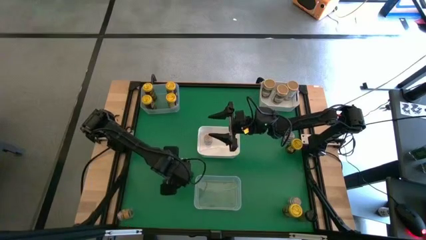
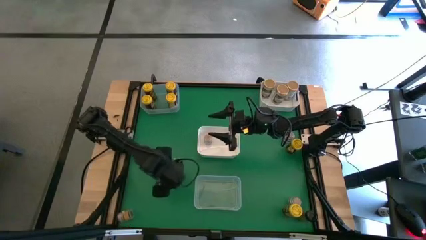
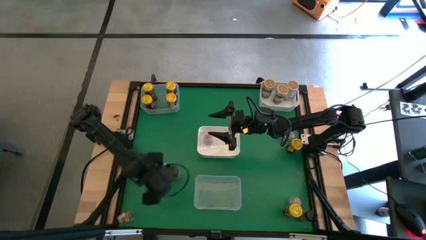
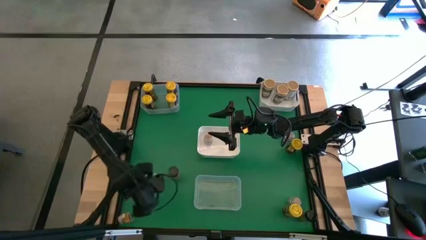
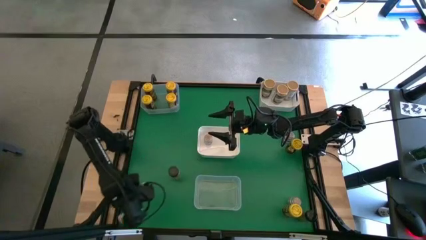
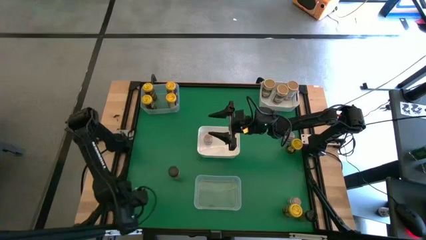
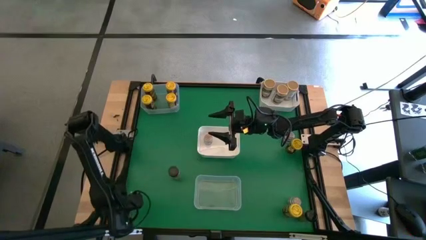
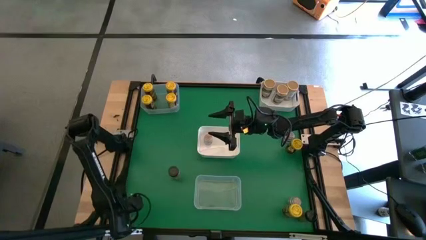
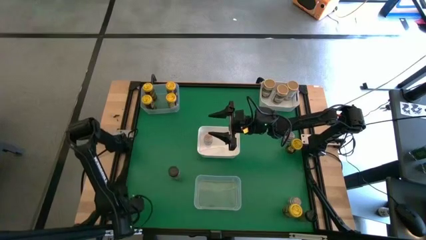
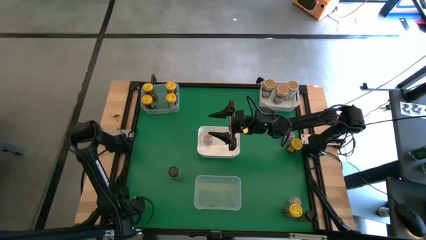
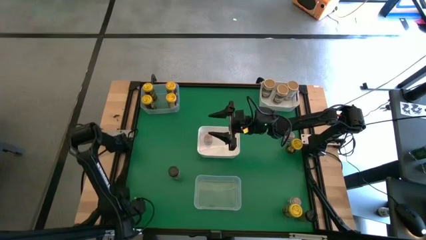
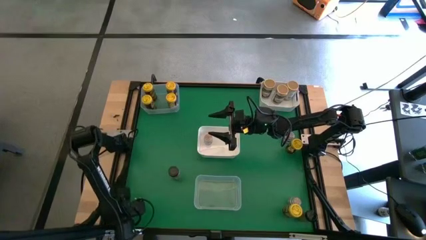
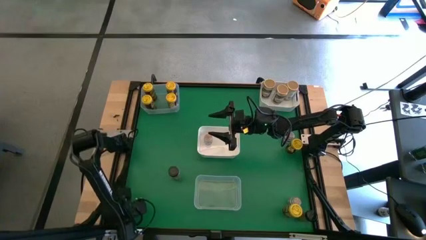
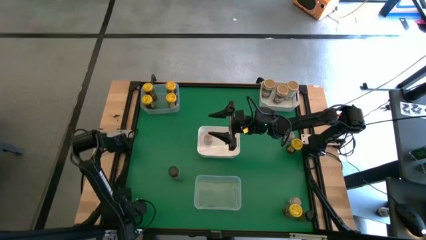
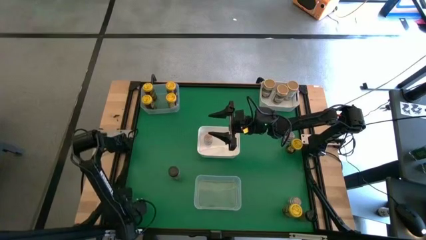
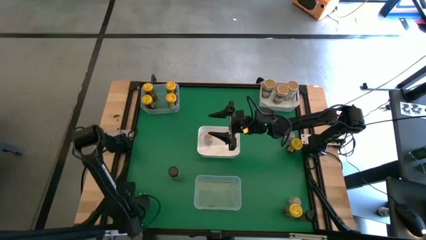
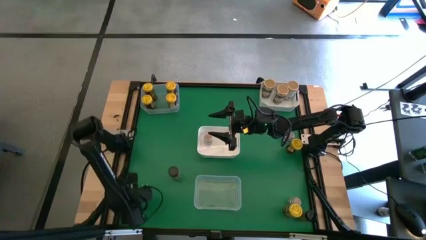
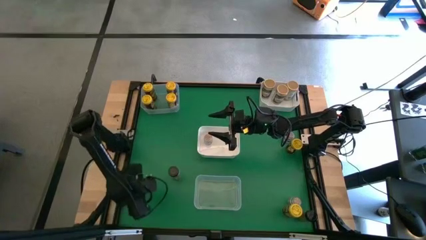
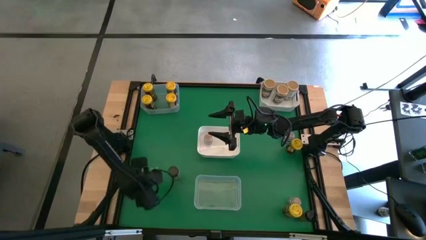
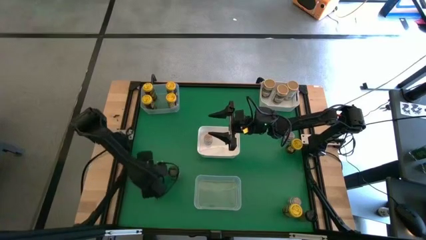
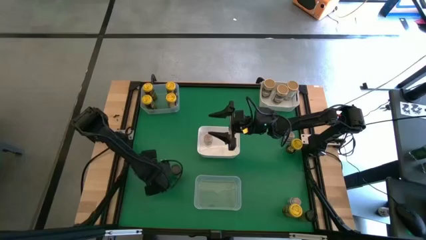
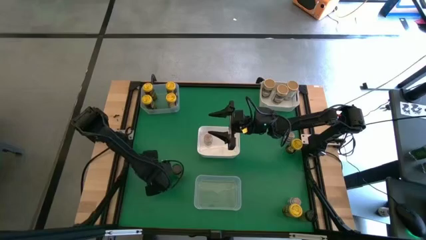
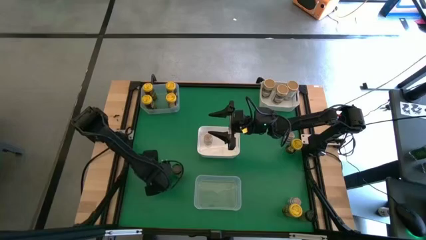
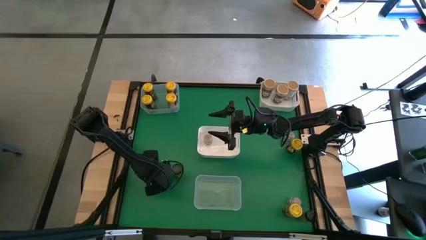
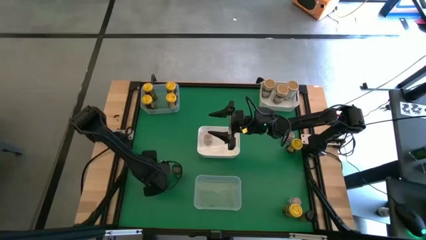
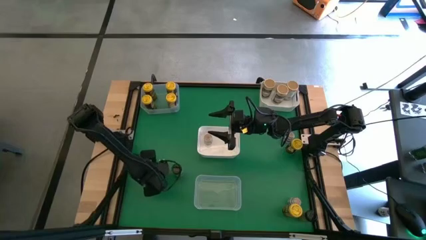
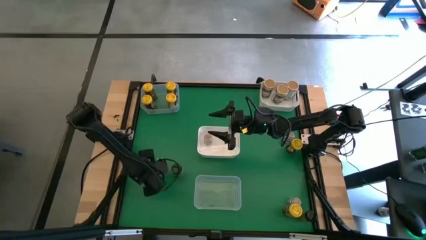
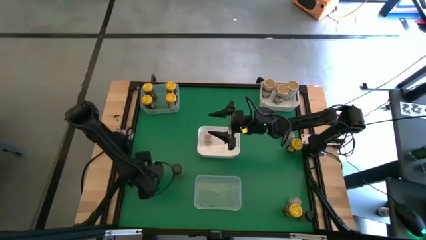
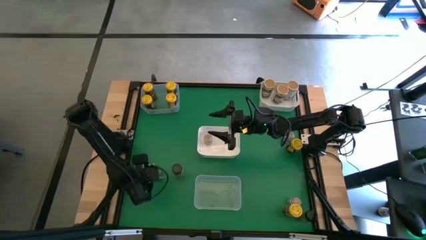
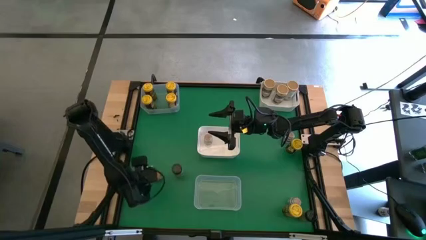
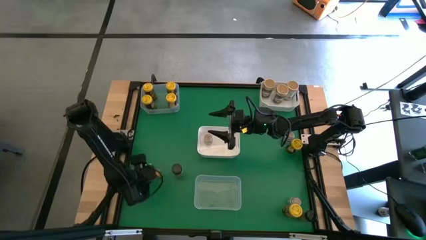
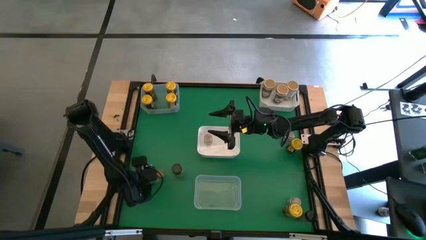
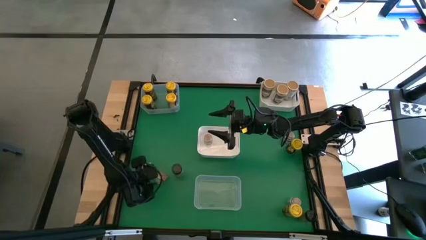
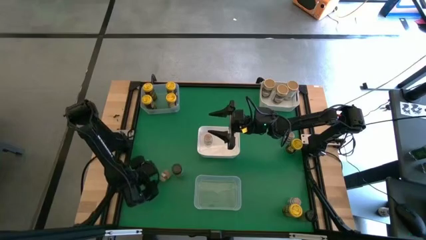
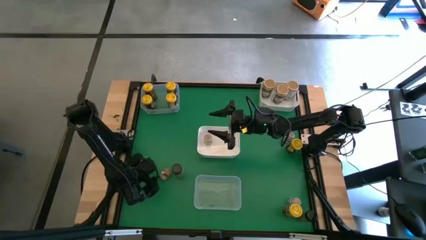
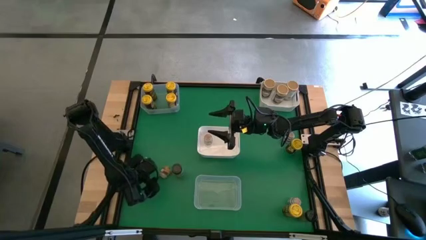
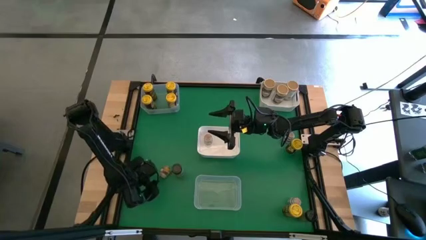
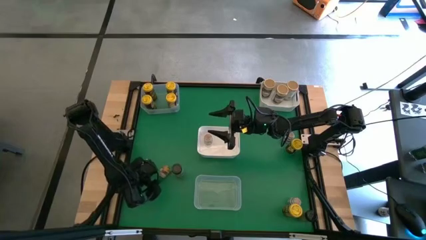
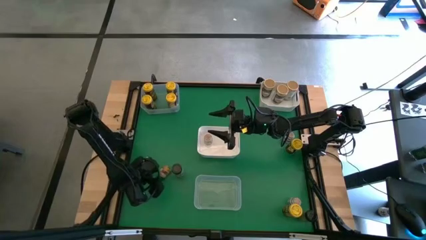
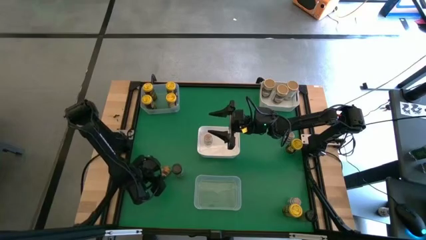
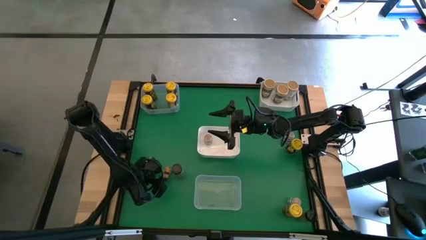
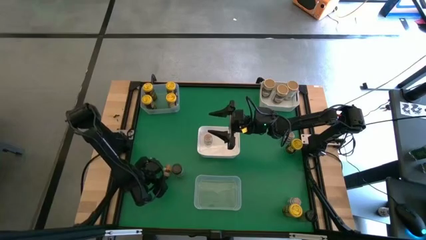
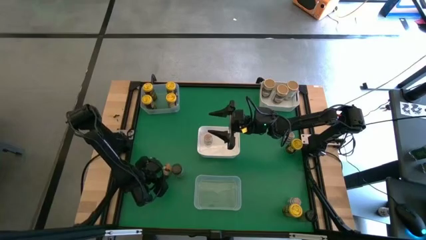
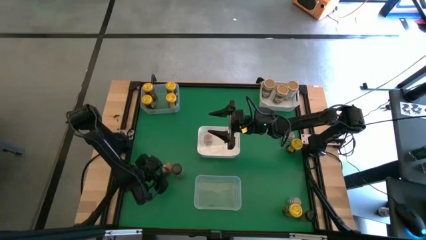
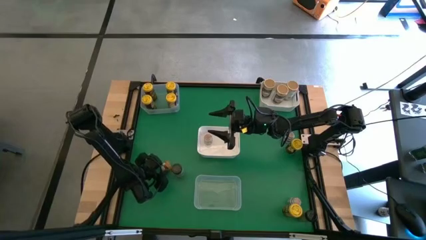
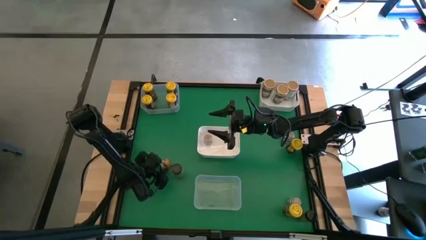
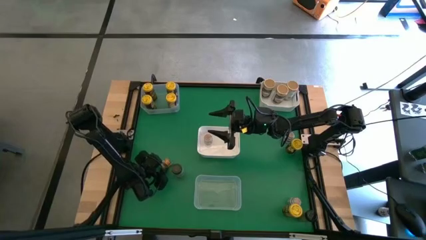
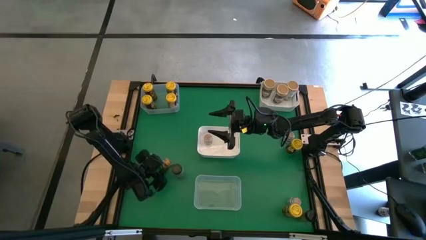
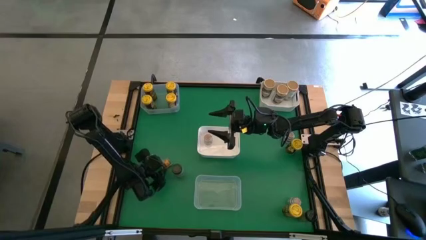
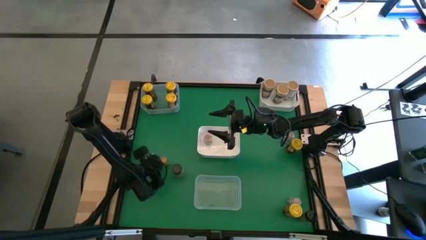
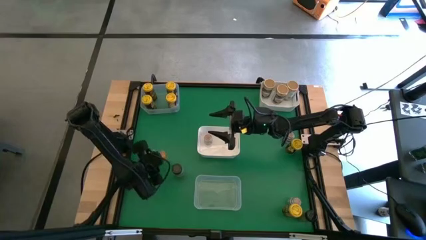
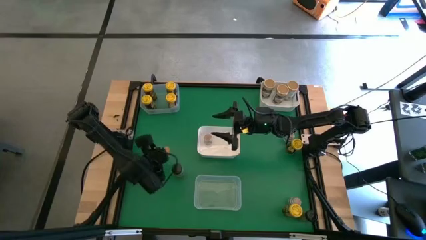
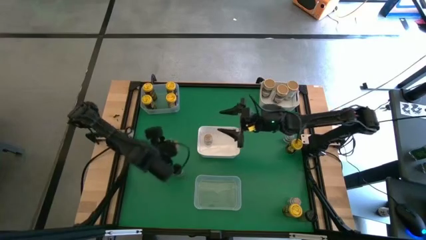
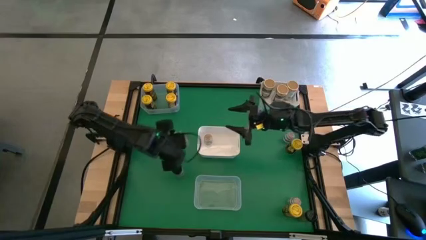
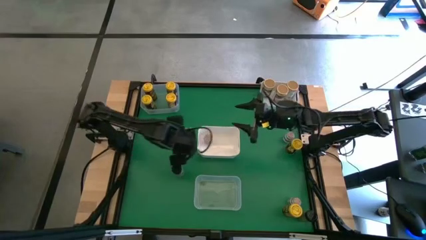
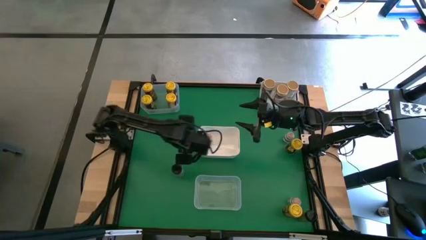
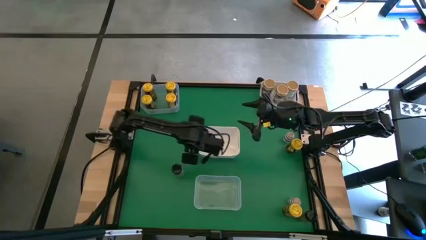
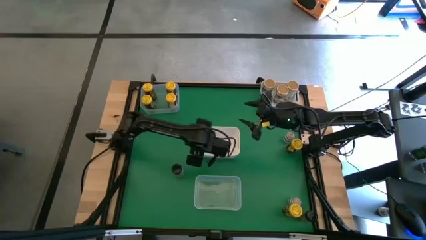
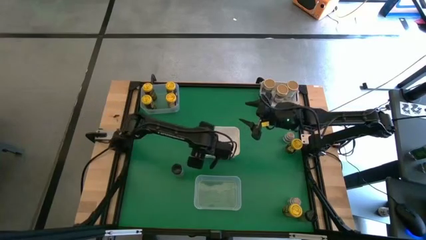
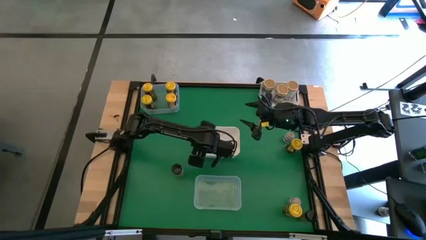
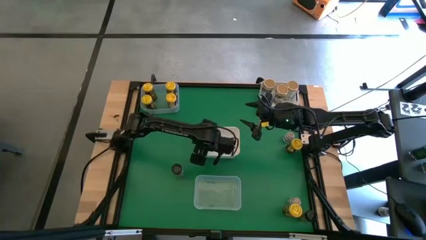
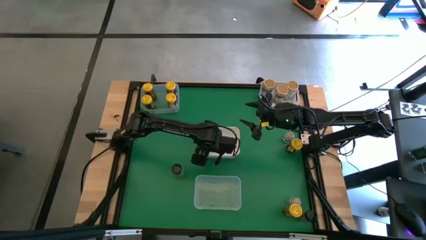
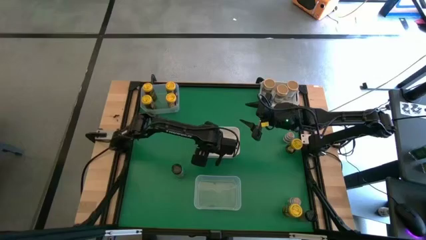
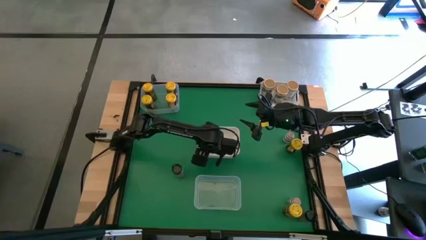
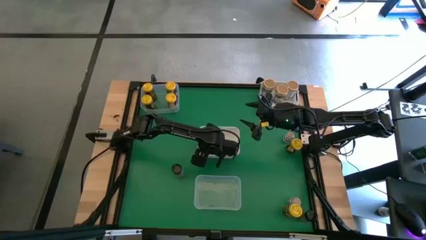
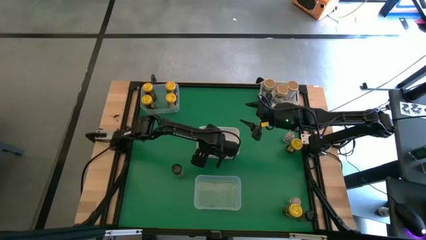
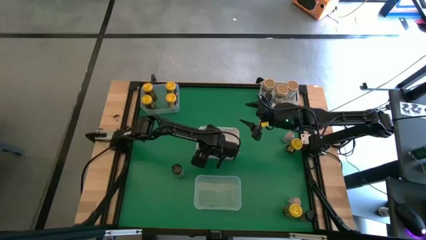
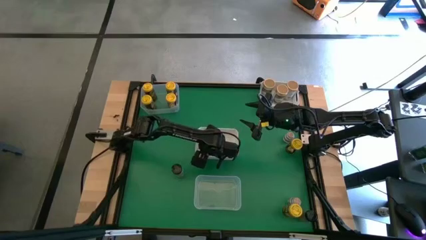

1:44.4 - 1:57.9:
Task: Sort spices by type
Put the left brown seasoning bottle into the bottom white bin

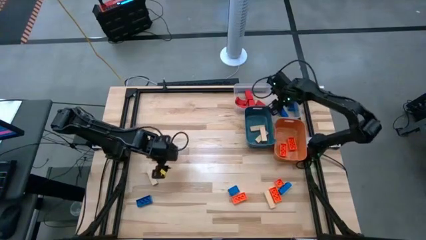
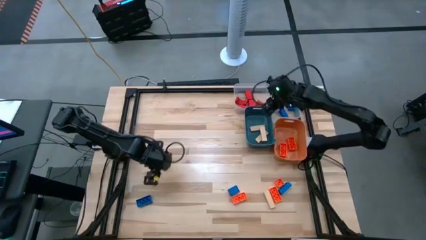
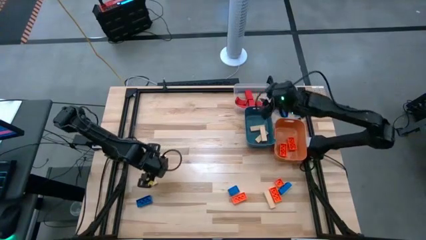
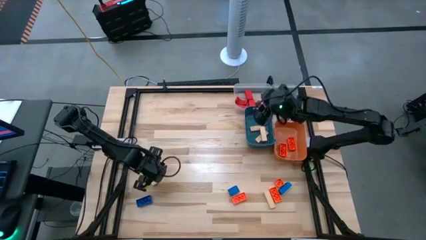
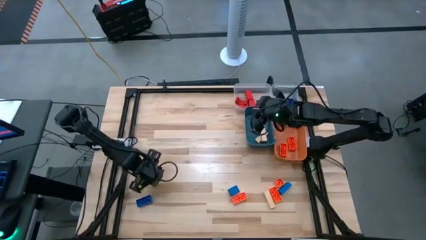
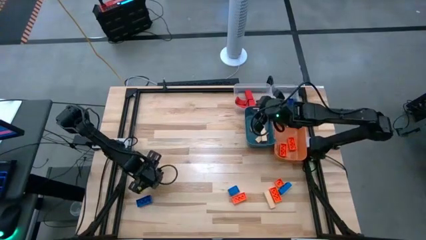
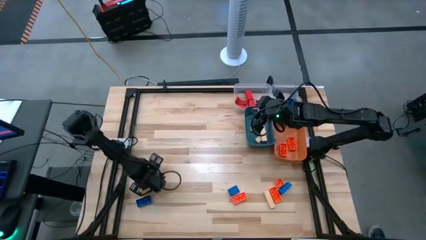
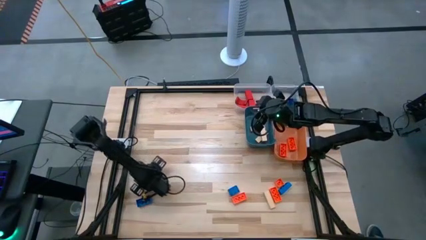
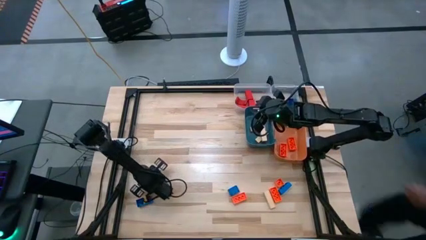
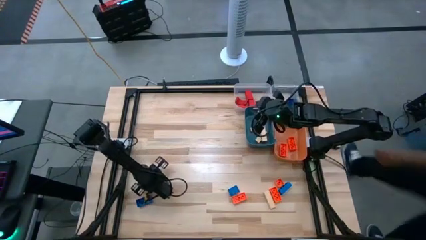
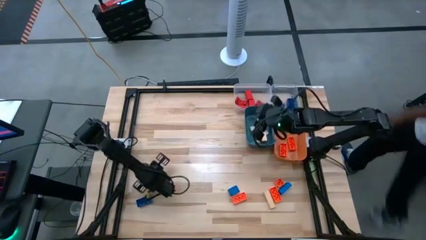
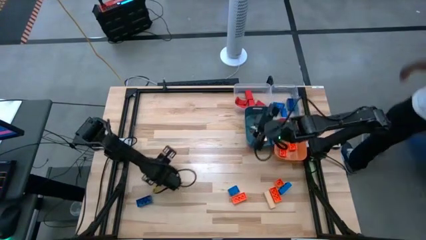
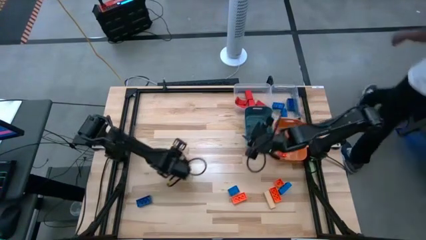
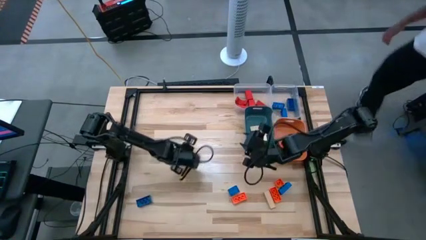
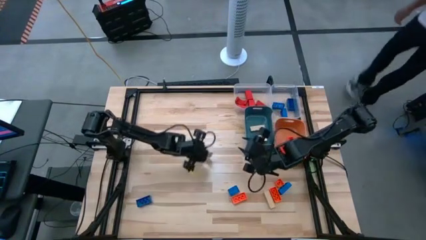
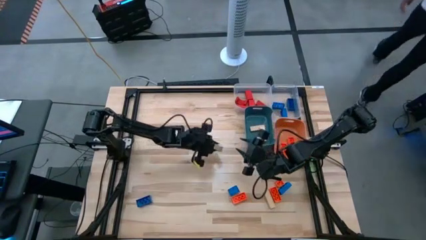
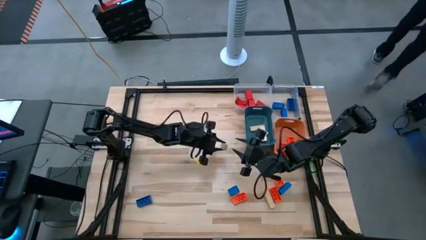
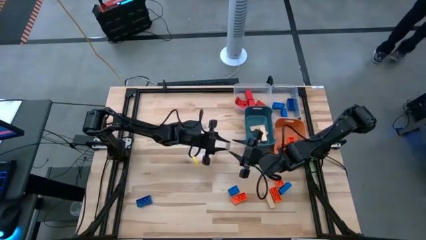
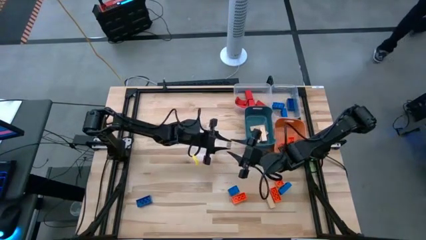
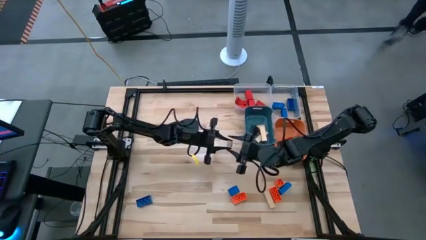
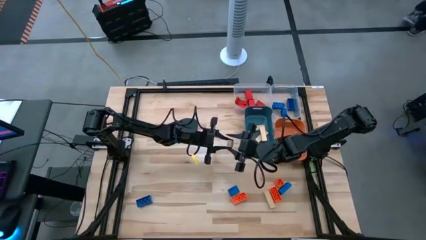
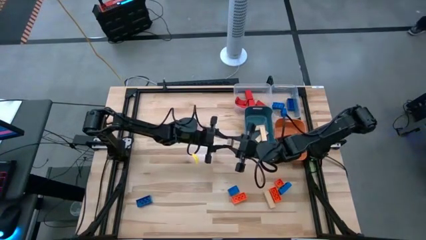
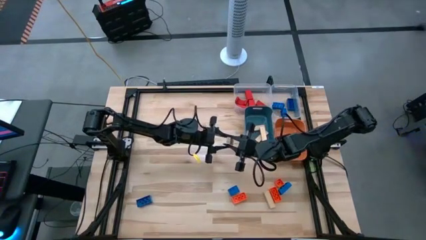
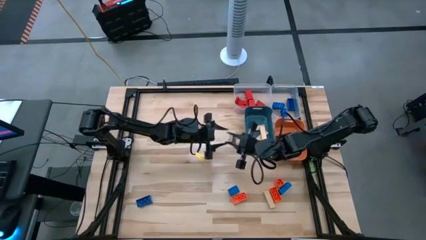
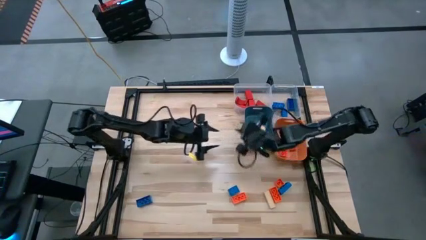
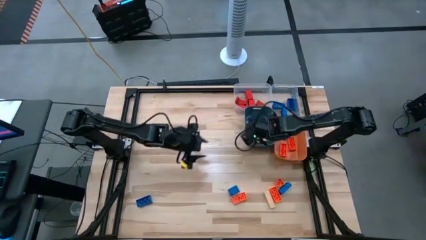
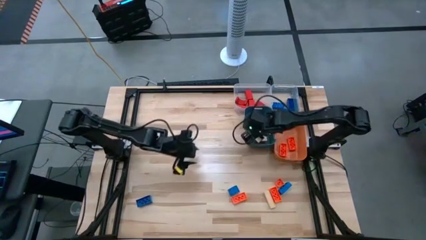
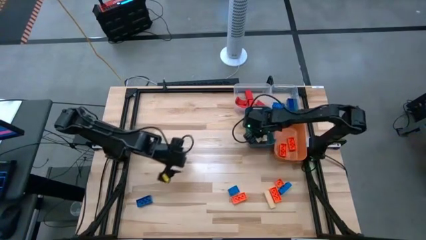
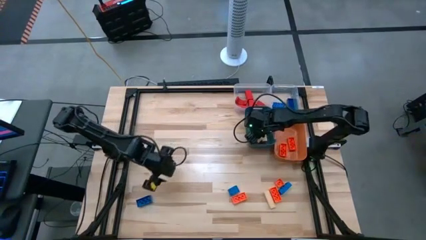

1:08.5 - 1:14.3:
Task: Sort blocks
Put the brown block into the blue bin
